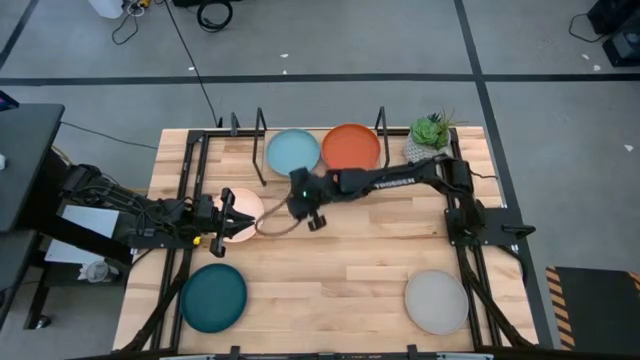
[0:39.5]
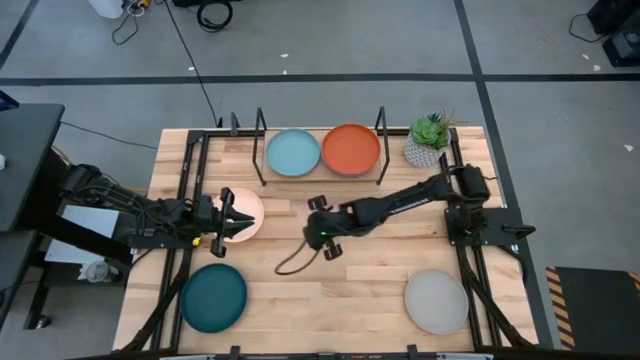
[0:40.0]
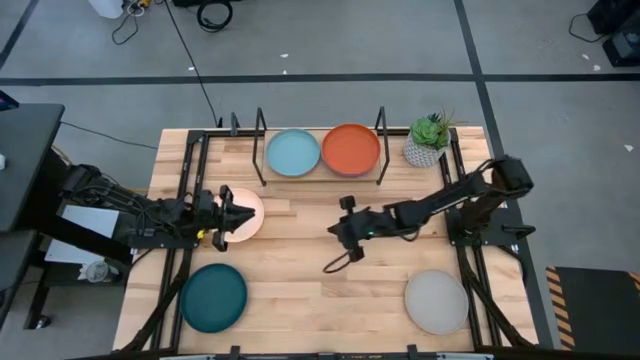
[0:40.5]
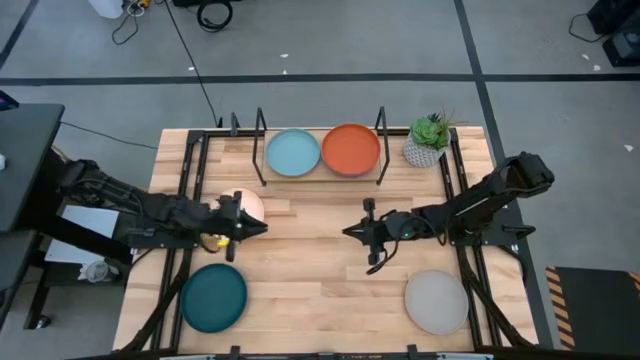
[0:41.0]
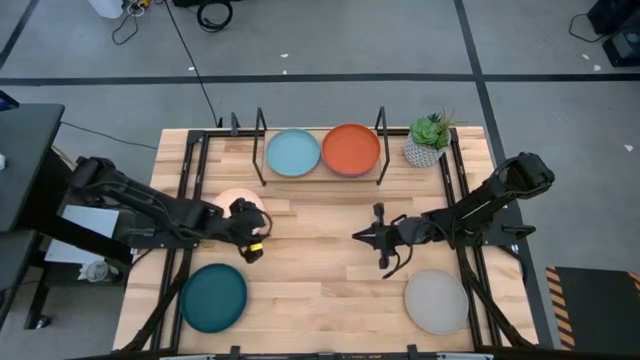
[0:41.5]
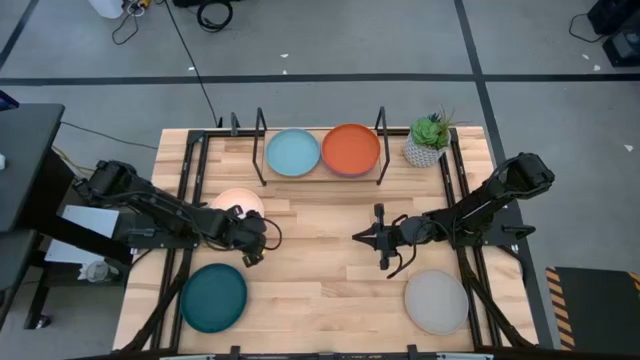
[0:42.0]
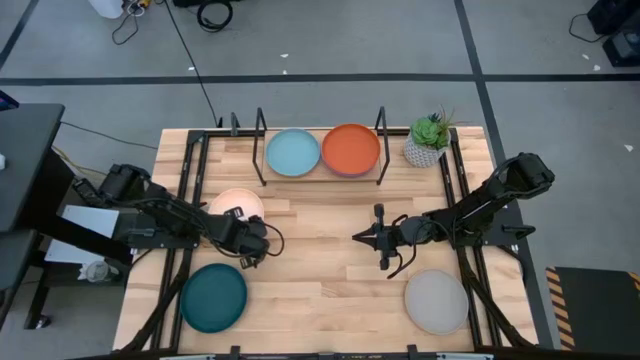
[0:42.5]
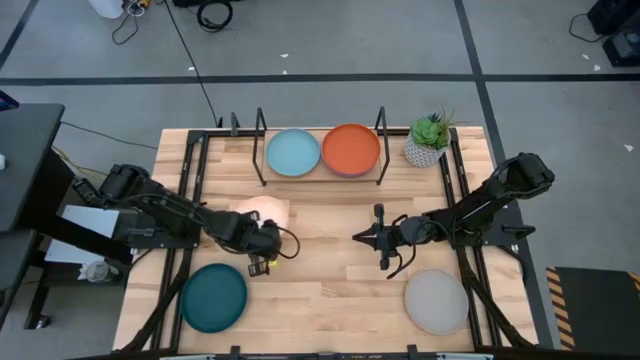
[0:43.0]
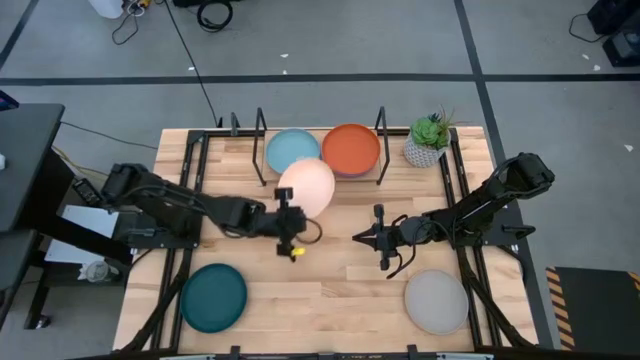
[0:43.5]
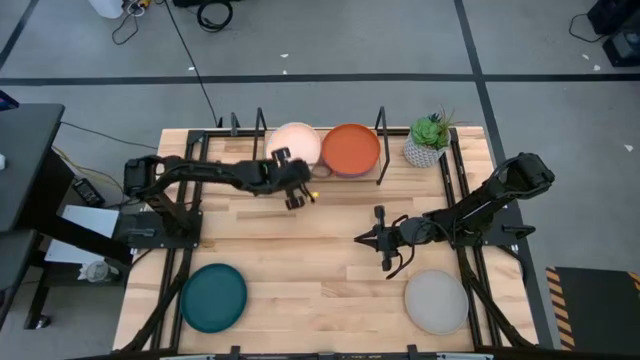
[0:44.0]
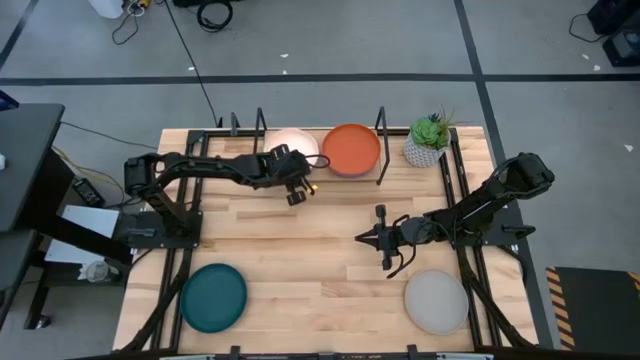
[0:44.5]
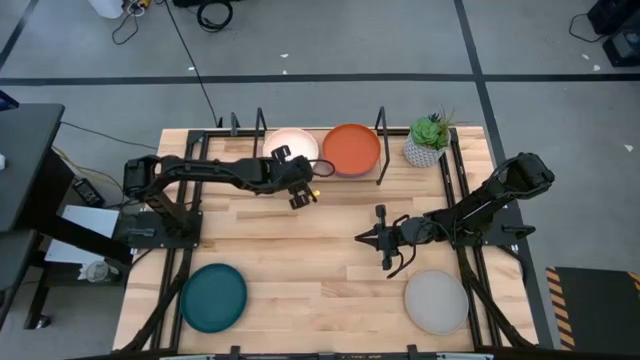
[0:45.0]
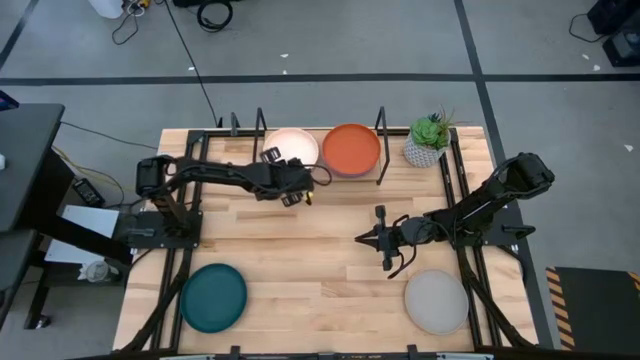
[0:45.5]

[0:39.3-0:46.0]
Task: Place and stack plates onto a shelf
Stack the light orange plate on the light blue plate on the shelf

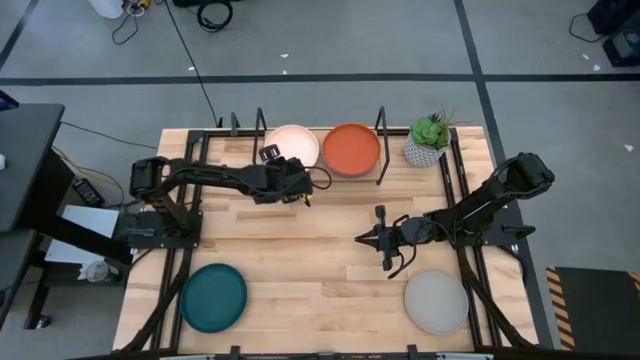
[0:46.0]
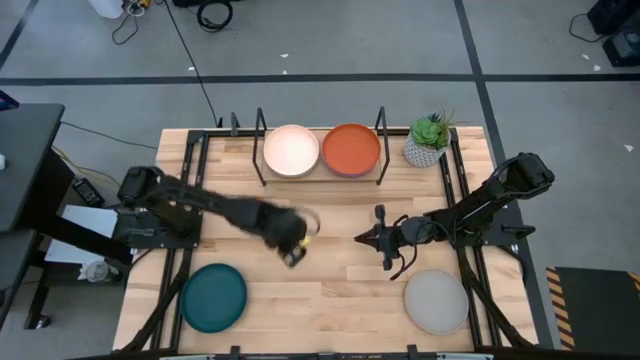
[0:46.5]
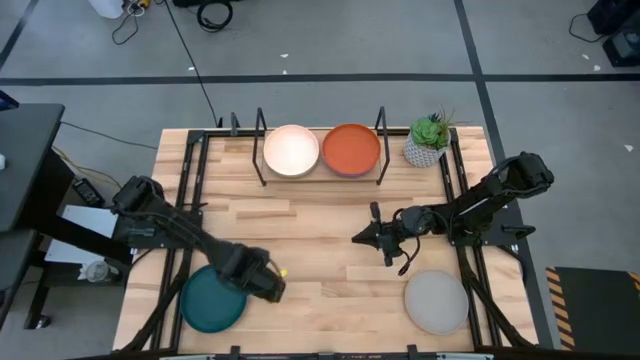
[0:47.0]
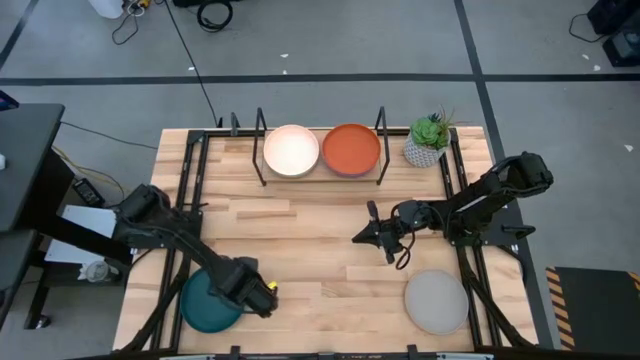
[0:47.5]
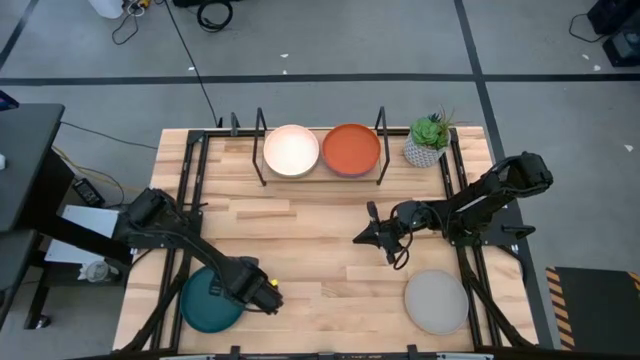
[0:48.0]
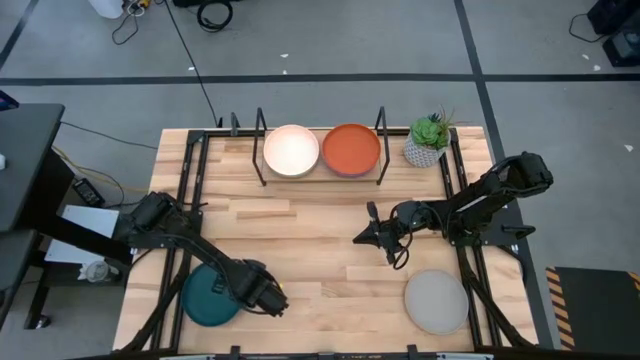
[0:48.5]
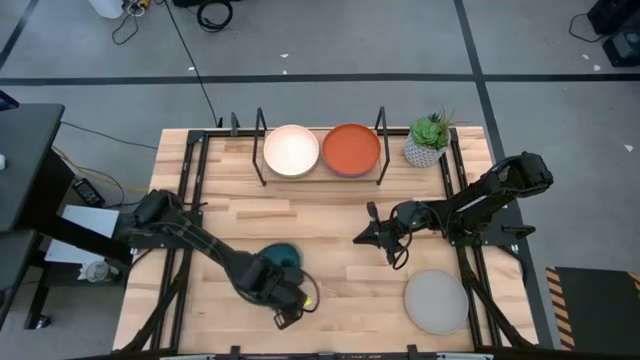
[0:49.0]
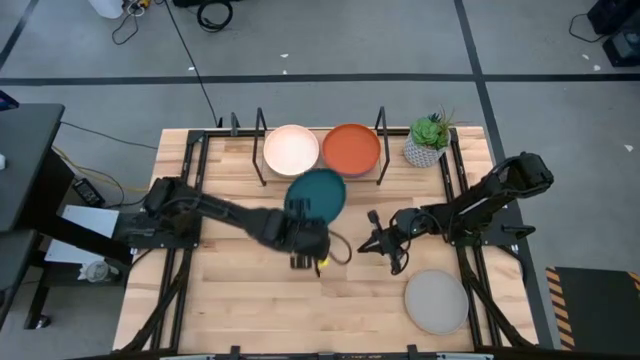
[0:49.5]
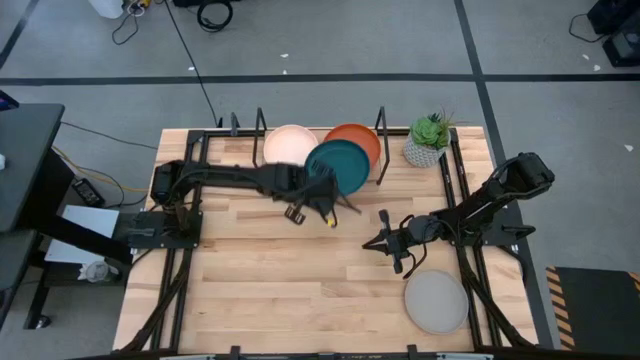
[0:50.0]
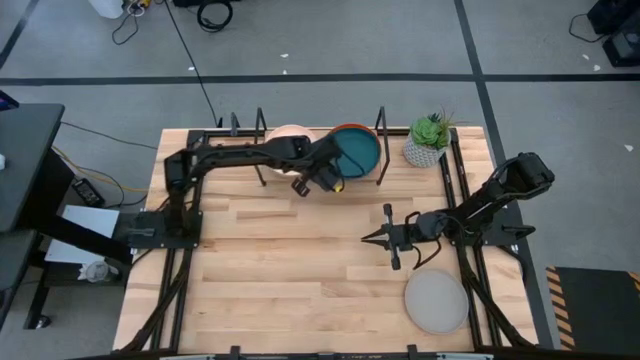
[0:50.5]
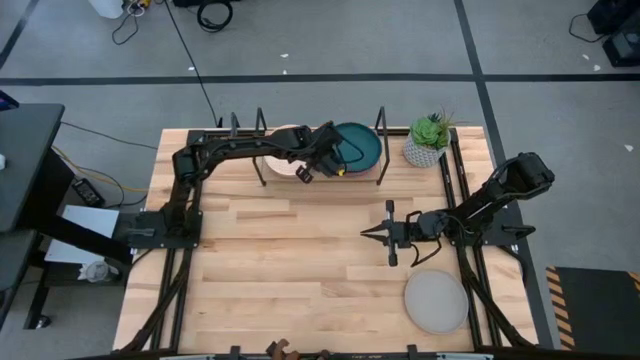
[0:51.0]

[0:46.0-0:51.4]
Stack the dark blue plate on top of the dark orange plate on the shelf

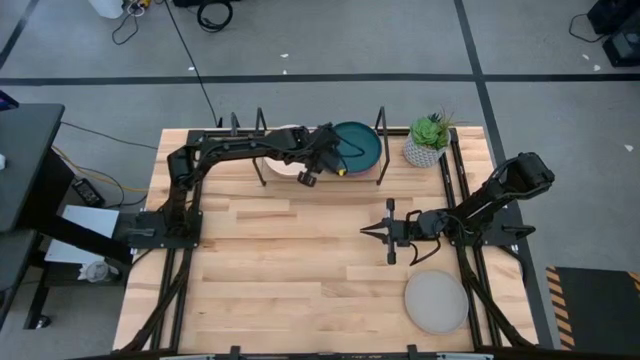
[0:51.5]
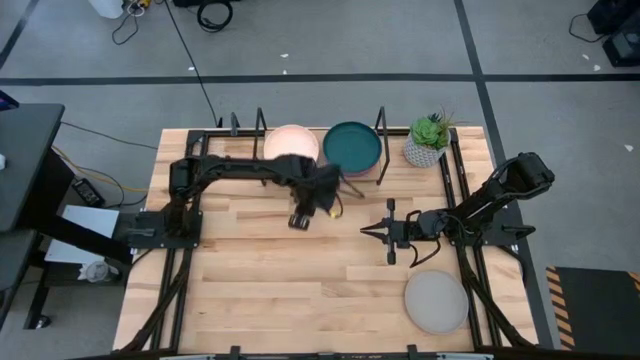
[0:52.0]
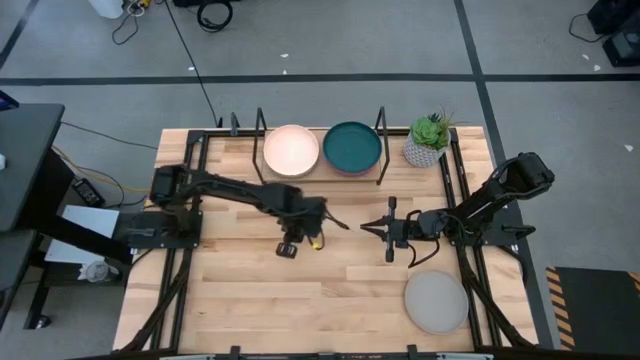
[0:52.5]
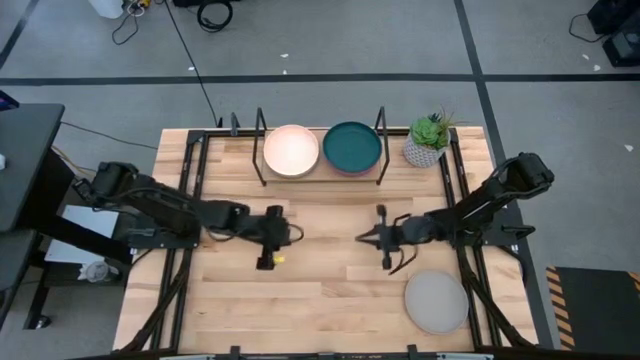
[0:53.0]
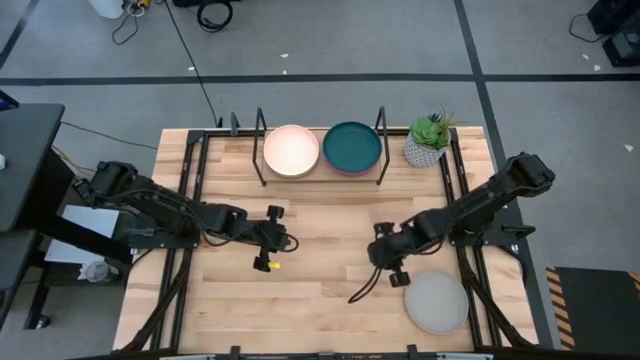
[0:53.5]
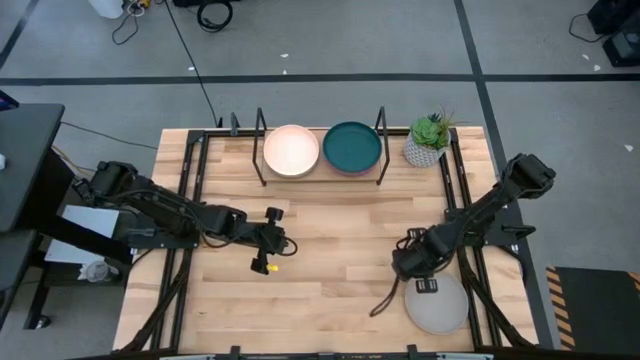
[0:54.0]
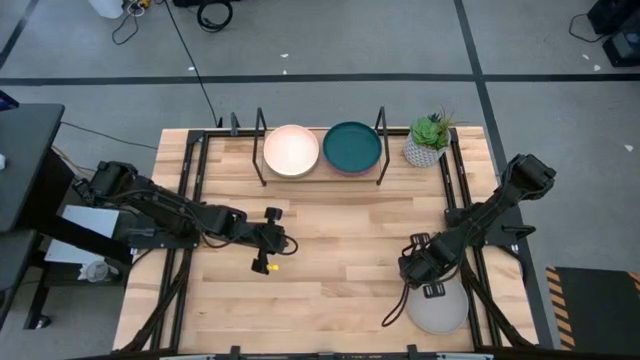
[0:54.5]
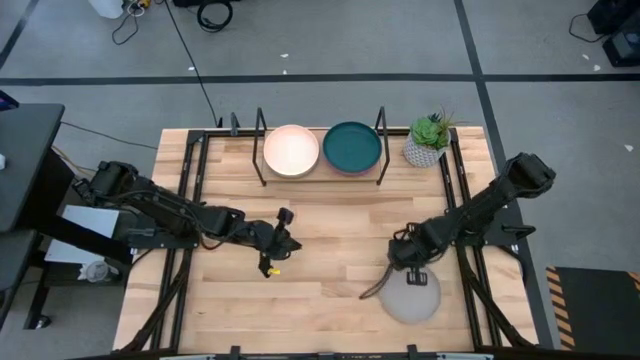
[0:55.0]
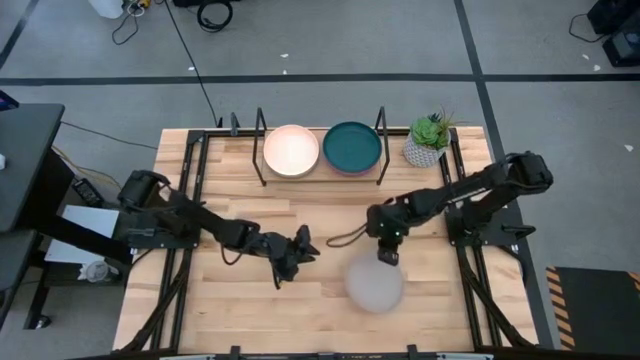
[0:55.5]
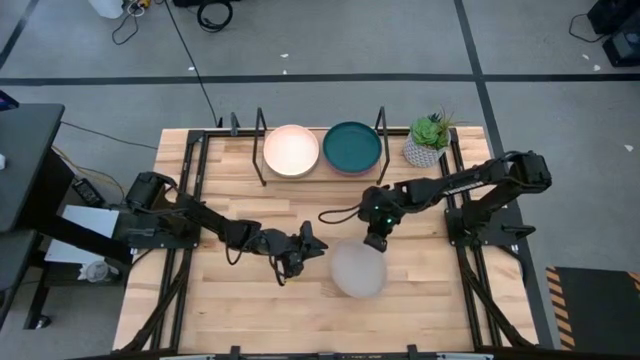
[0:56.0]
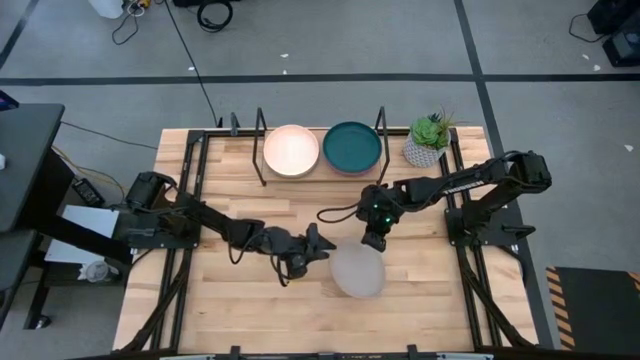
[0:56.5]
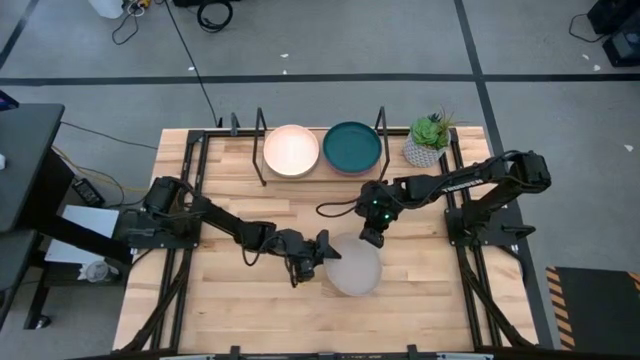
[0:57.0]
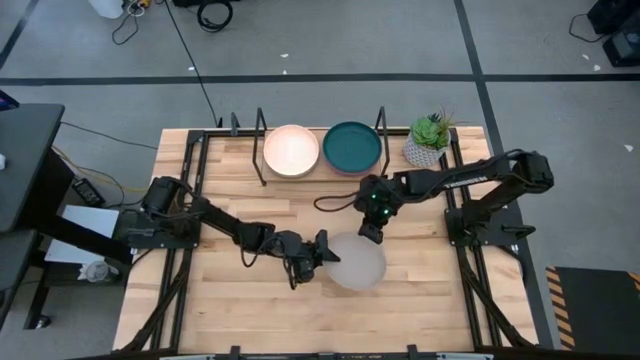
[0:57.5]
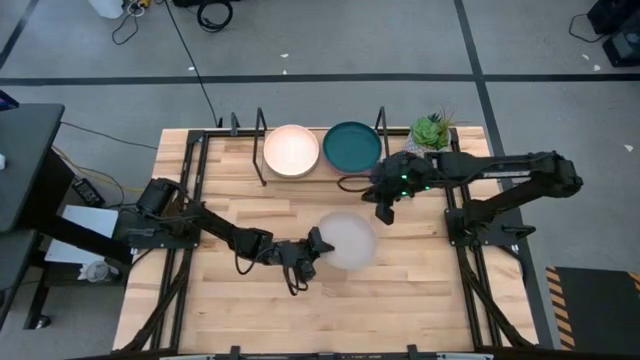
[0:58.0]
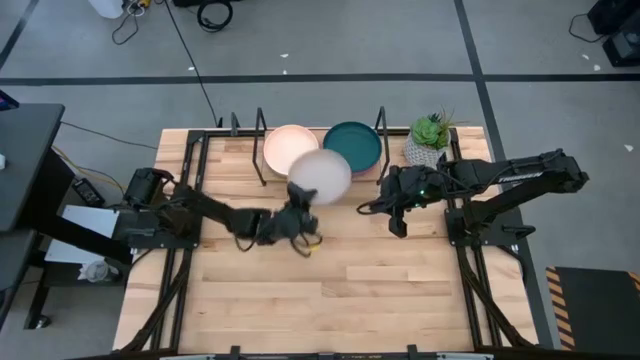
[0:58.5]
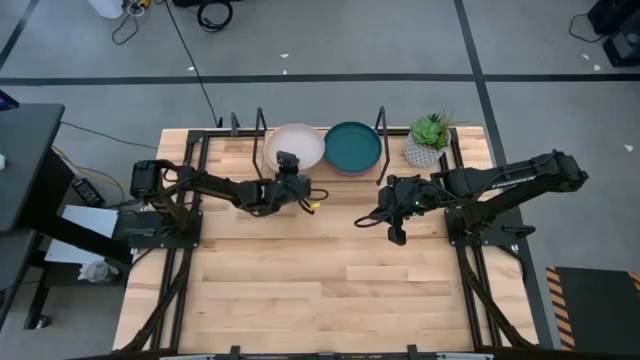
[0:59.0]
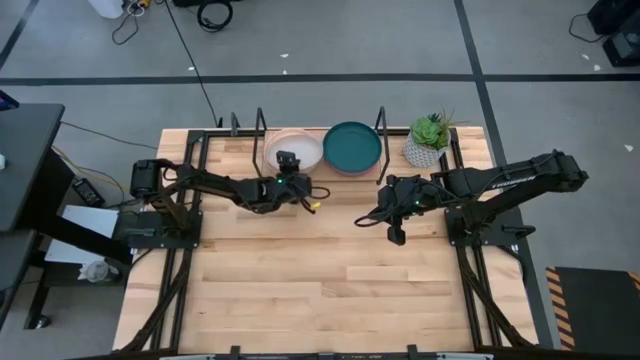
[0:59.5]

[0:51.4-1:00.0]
Stack the light brown plate on top of the light orange plate on the shelf

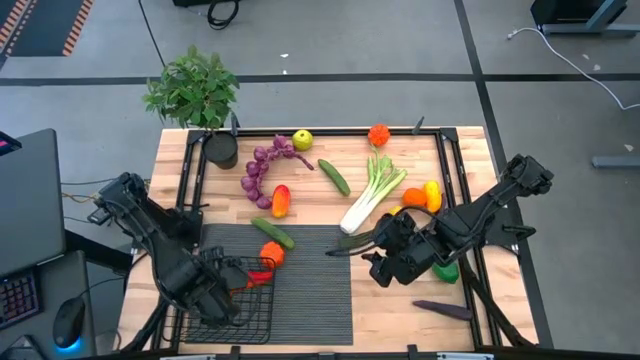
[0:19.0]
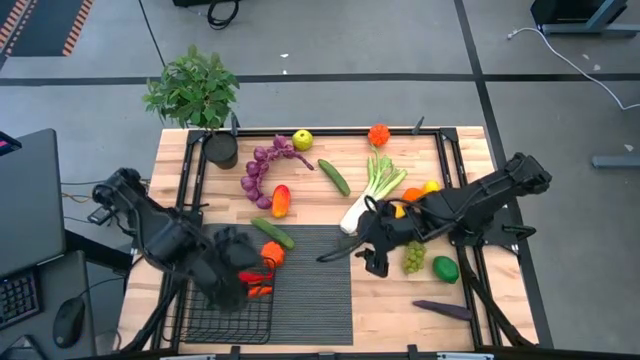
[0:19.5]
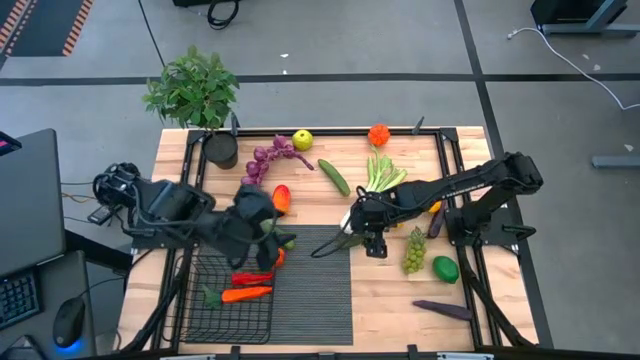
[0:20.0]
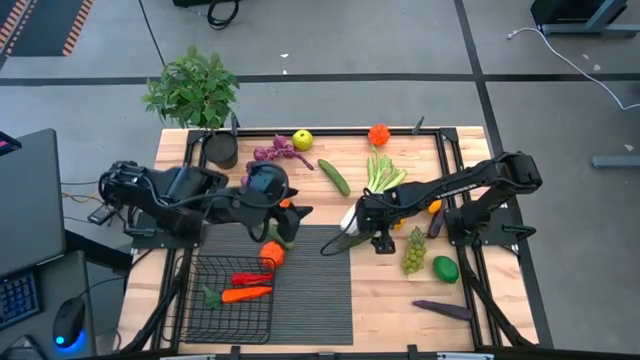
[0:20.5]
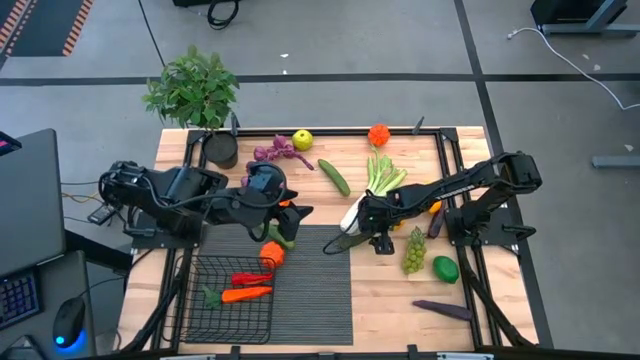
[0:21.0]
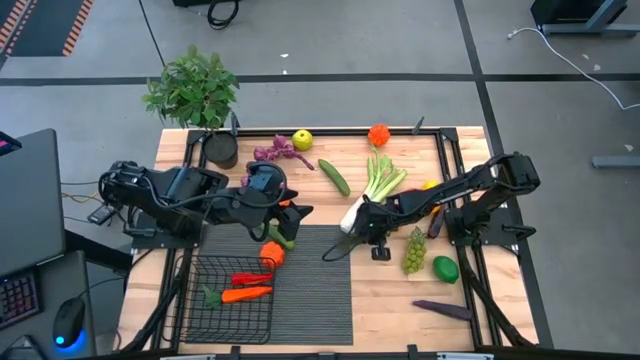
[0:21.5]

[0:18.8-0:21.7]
Task: Build produce basket
Put the green chili pepper into the wire basket
